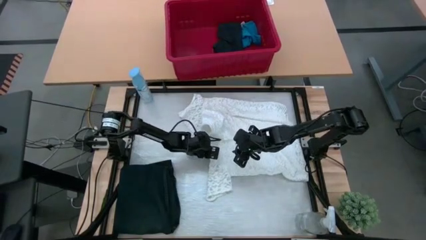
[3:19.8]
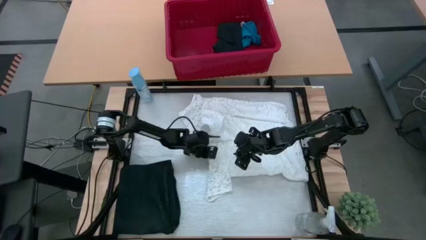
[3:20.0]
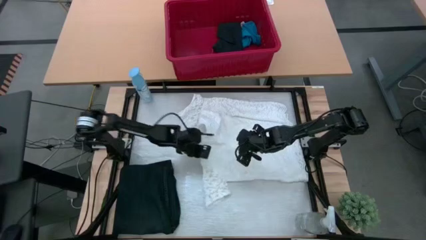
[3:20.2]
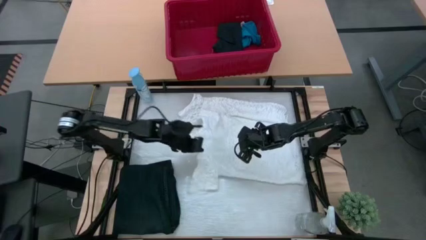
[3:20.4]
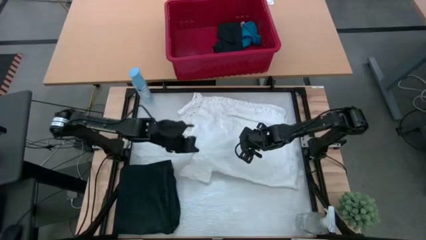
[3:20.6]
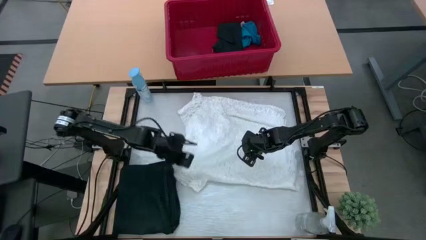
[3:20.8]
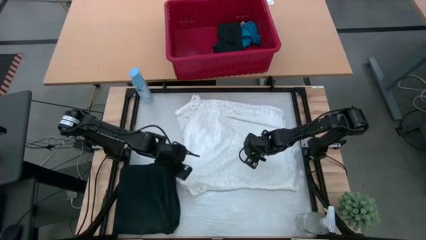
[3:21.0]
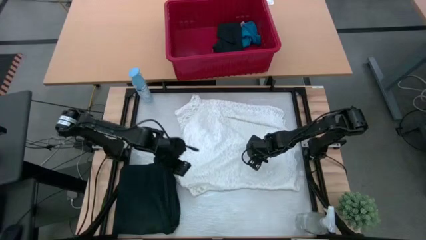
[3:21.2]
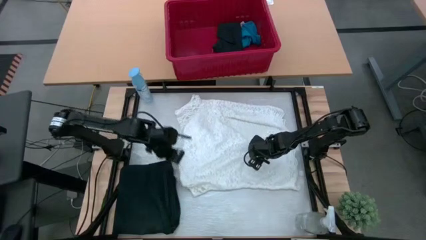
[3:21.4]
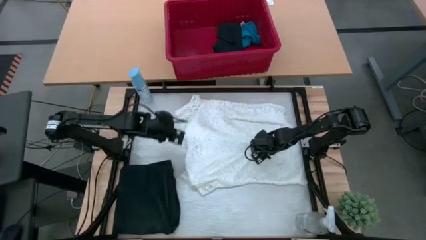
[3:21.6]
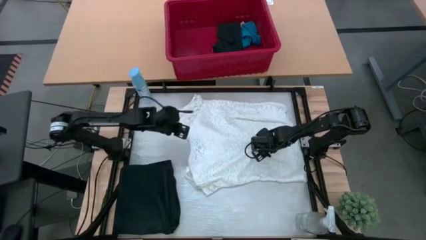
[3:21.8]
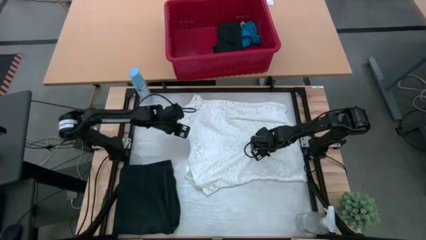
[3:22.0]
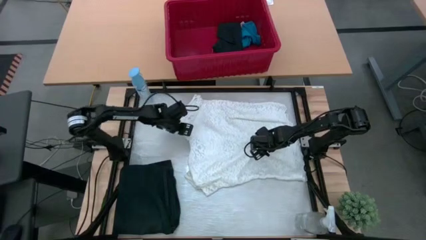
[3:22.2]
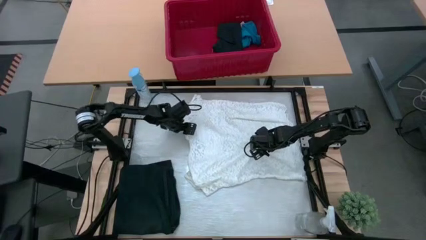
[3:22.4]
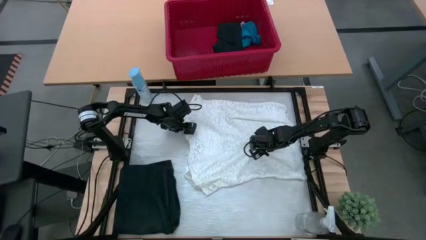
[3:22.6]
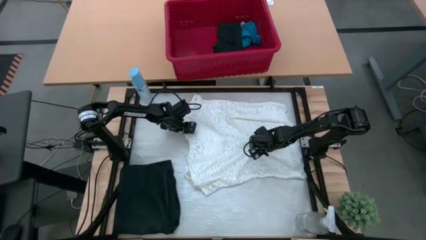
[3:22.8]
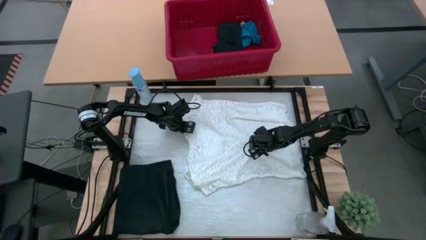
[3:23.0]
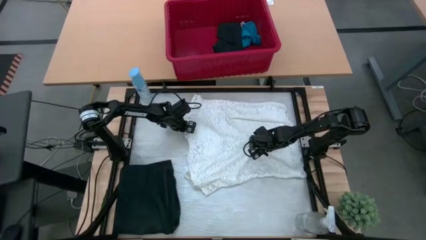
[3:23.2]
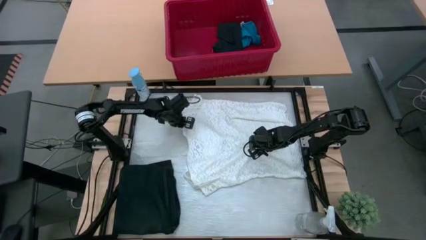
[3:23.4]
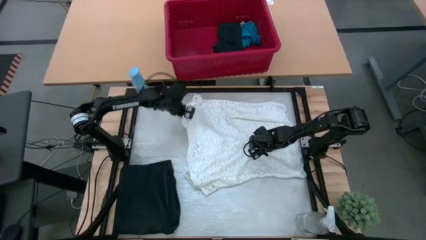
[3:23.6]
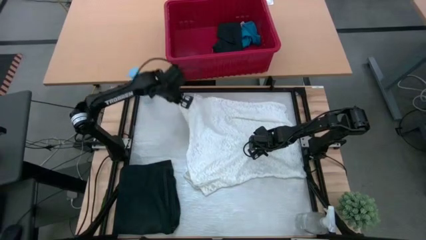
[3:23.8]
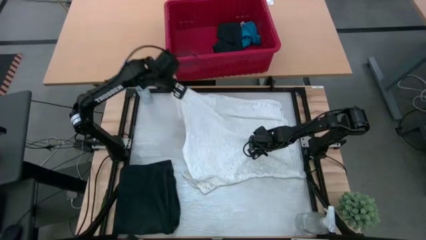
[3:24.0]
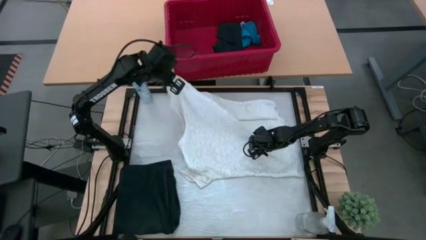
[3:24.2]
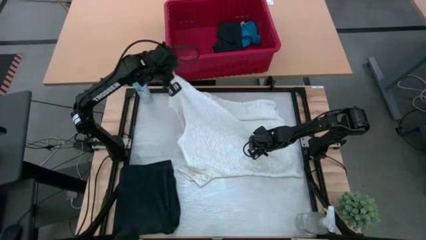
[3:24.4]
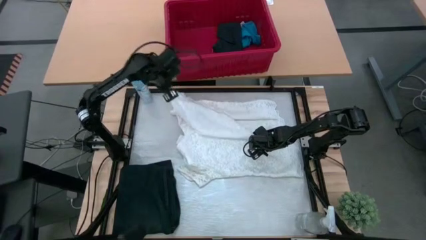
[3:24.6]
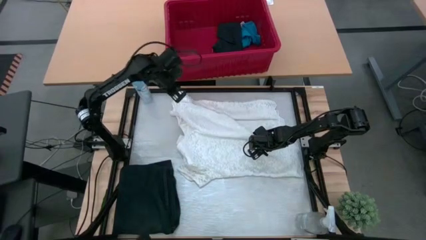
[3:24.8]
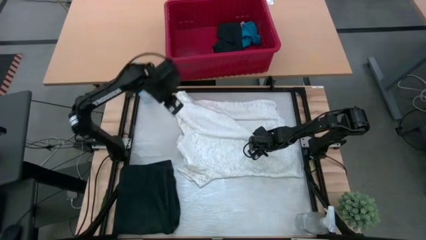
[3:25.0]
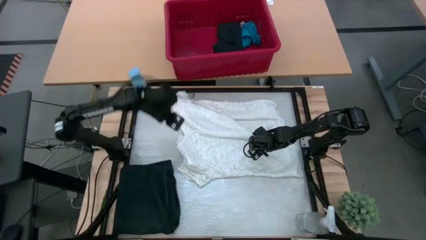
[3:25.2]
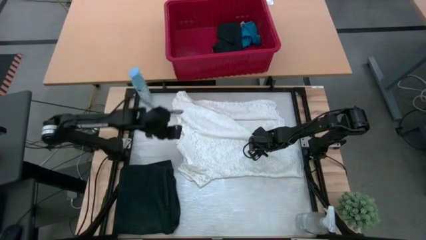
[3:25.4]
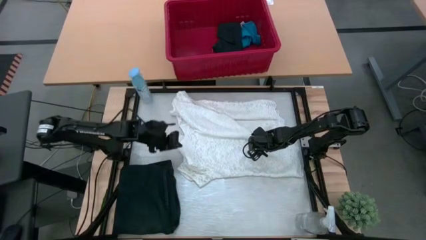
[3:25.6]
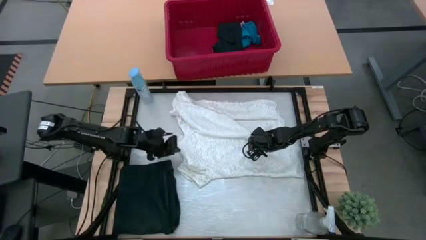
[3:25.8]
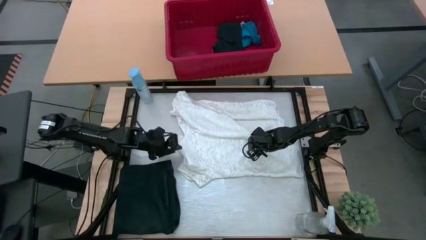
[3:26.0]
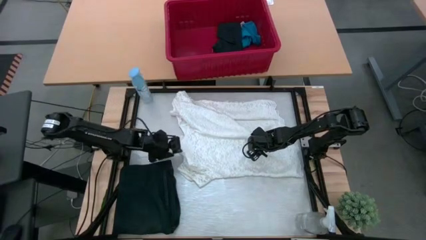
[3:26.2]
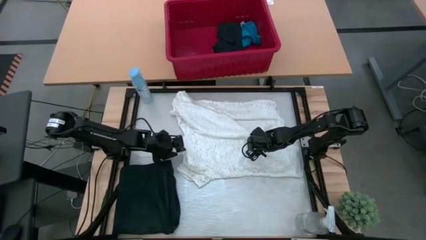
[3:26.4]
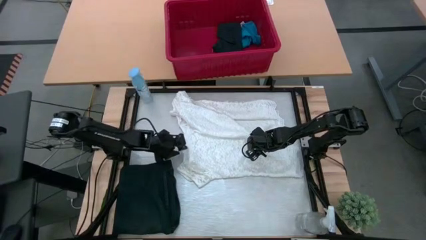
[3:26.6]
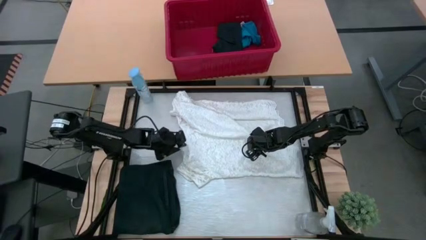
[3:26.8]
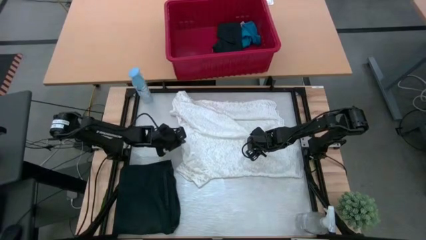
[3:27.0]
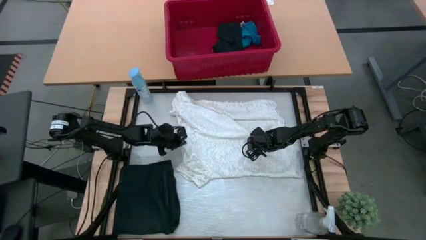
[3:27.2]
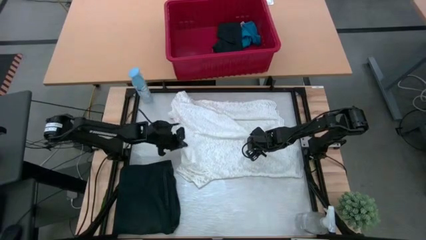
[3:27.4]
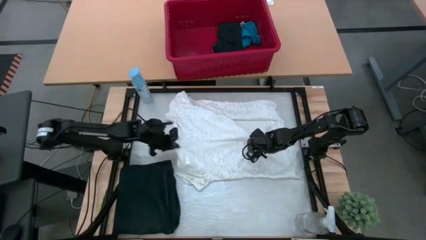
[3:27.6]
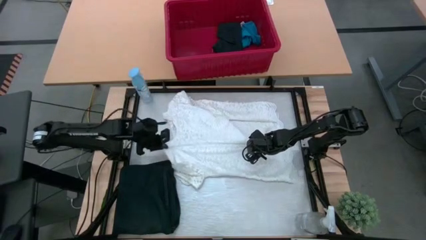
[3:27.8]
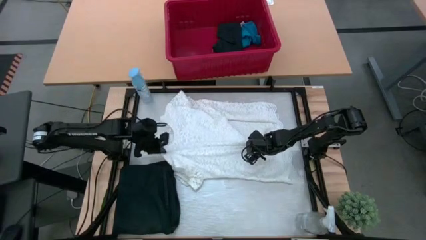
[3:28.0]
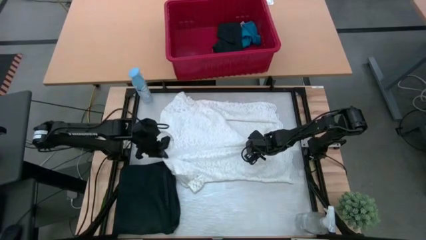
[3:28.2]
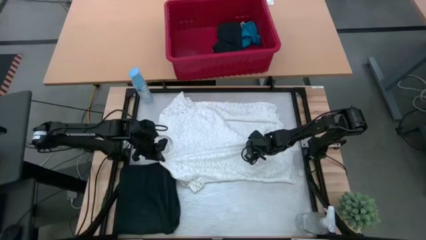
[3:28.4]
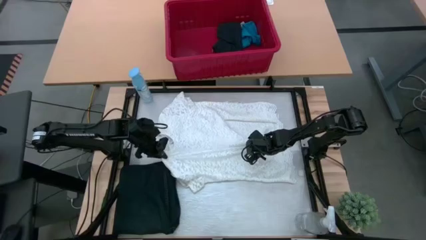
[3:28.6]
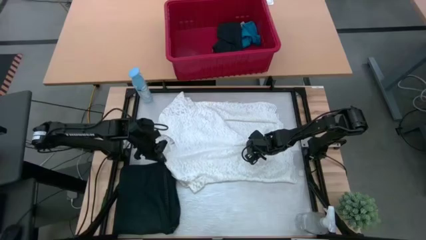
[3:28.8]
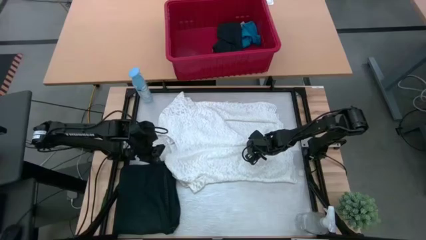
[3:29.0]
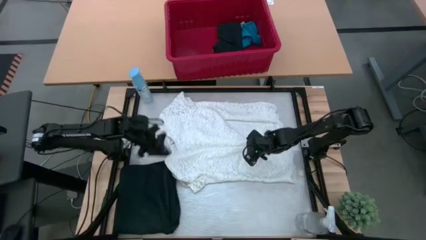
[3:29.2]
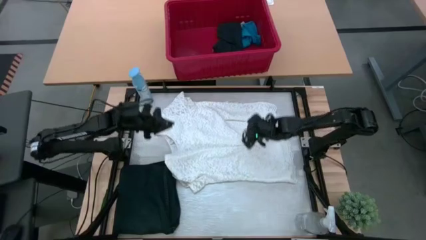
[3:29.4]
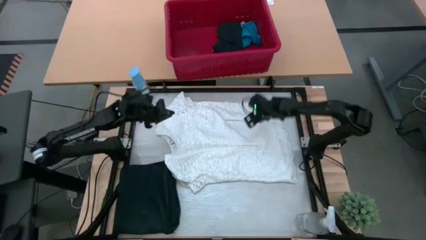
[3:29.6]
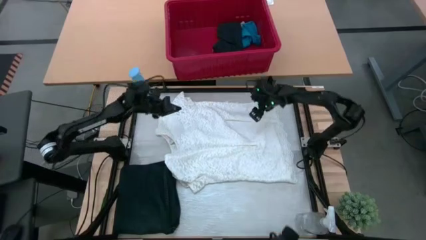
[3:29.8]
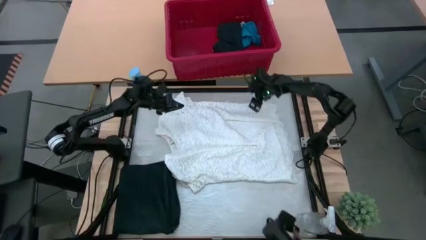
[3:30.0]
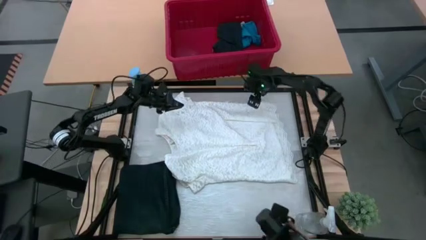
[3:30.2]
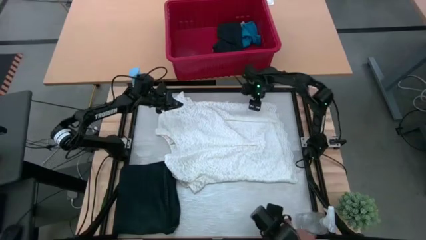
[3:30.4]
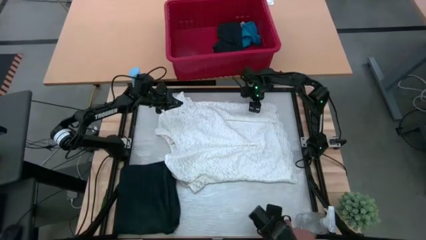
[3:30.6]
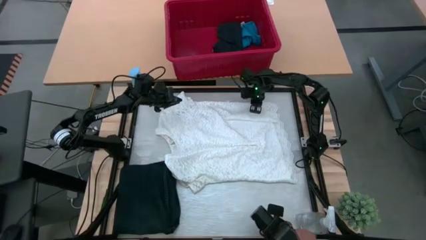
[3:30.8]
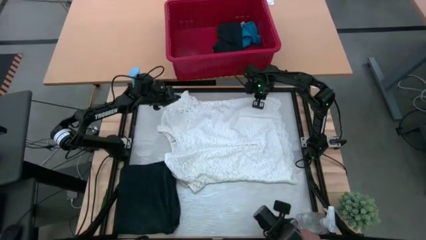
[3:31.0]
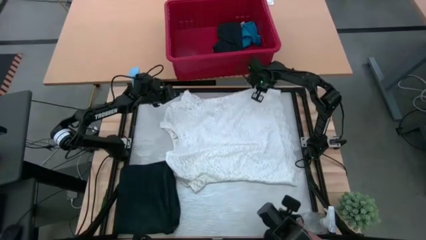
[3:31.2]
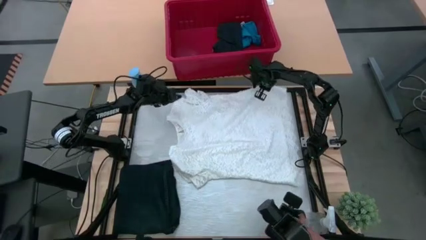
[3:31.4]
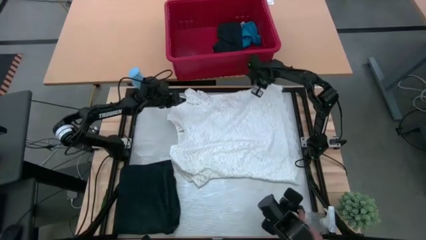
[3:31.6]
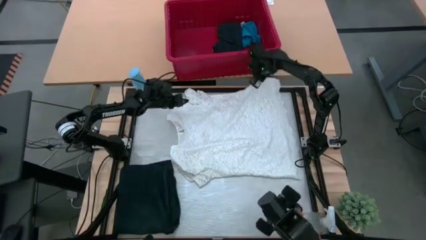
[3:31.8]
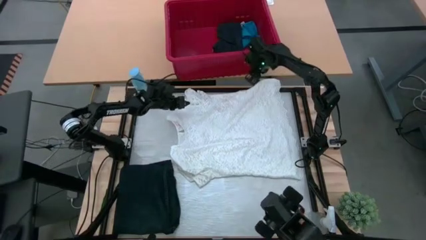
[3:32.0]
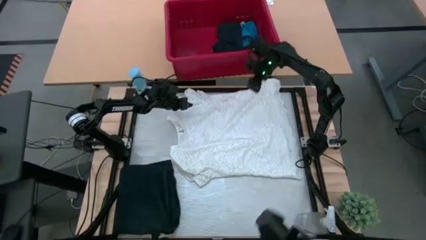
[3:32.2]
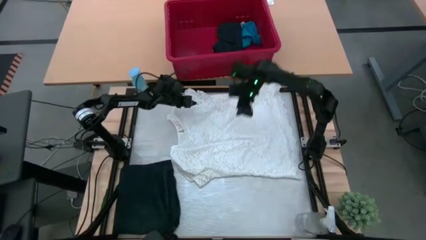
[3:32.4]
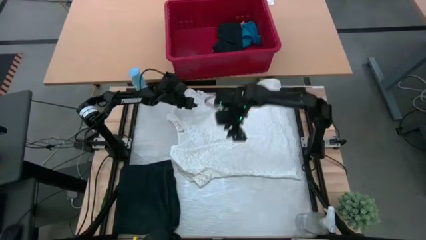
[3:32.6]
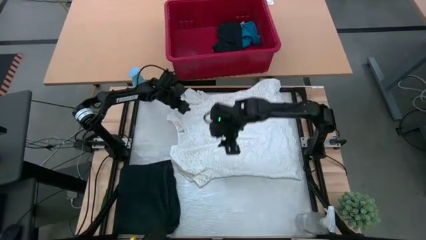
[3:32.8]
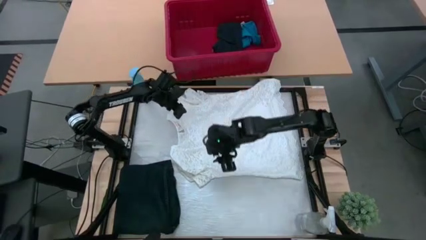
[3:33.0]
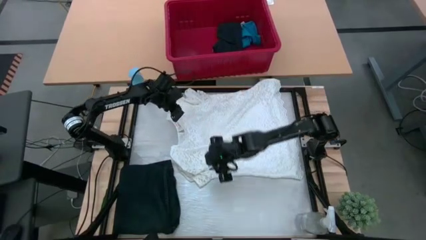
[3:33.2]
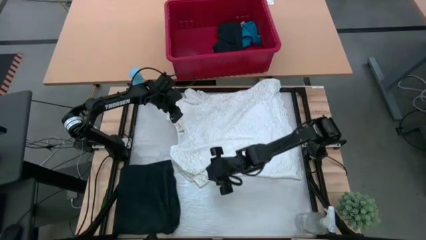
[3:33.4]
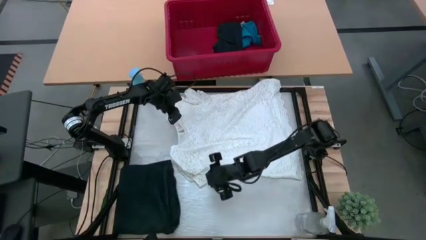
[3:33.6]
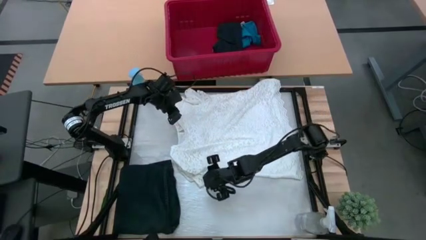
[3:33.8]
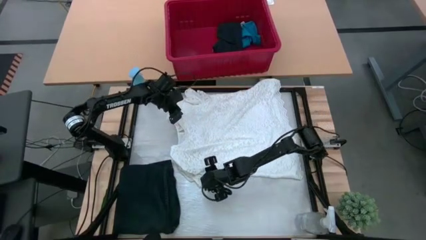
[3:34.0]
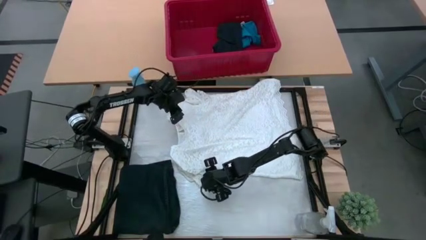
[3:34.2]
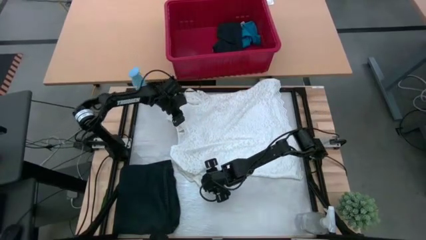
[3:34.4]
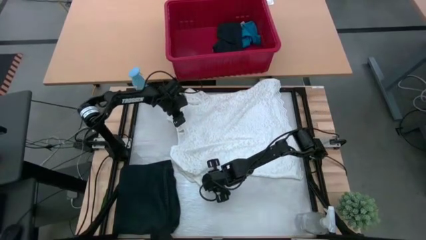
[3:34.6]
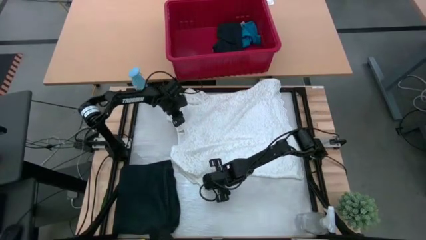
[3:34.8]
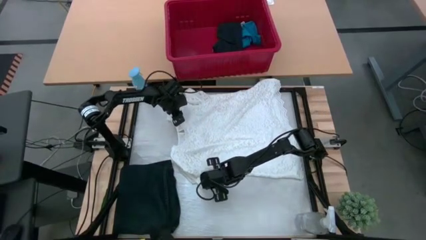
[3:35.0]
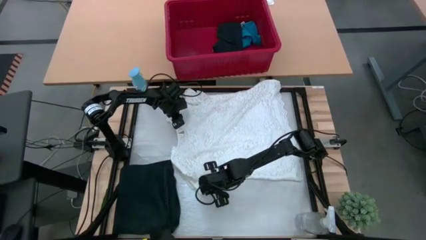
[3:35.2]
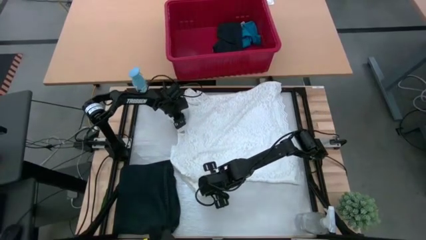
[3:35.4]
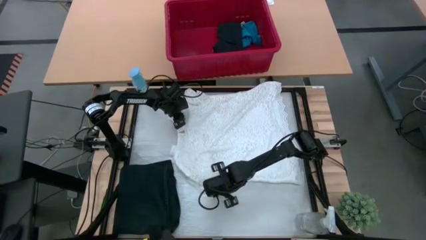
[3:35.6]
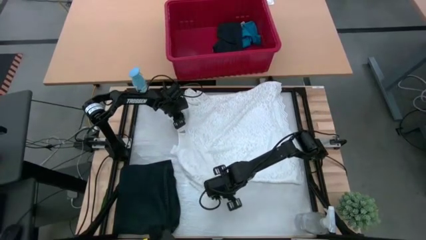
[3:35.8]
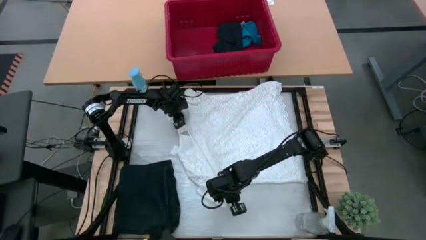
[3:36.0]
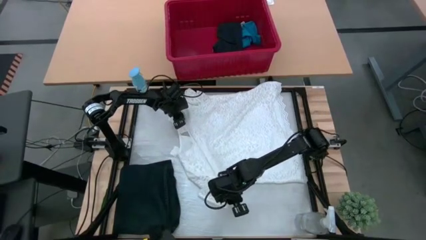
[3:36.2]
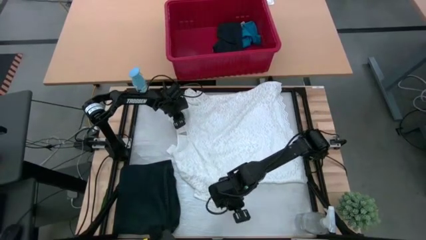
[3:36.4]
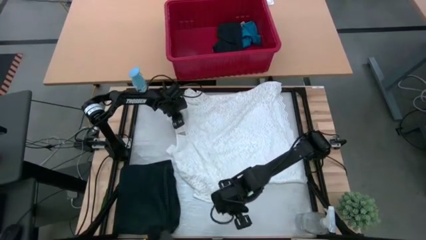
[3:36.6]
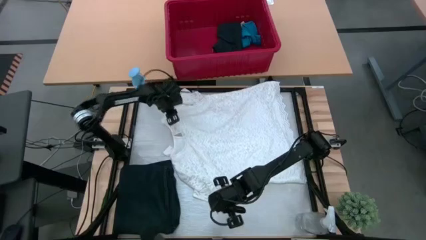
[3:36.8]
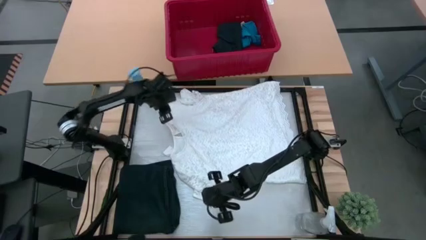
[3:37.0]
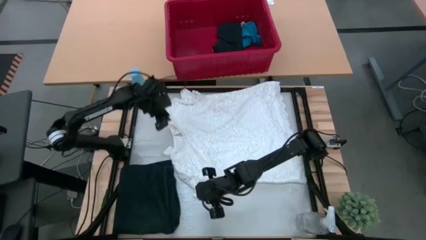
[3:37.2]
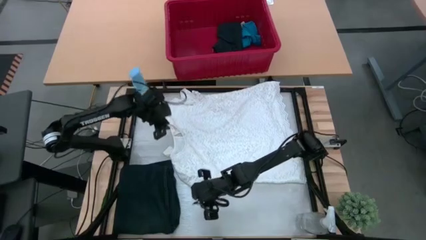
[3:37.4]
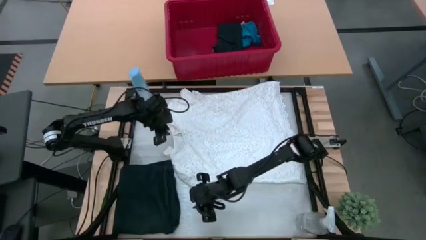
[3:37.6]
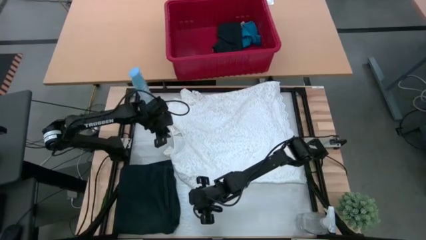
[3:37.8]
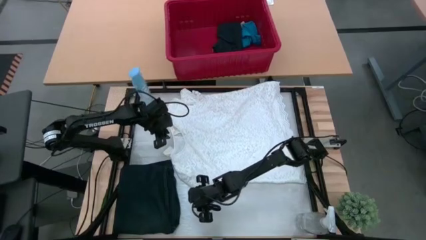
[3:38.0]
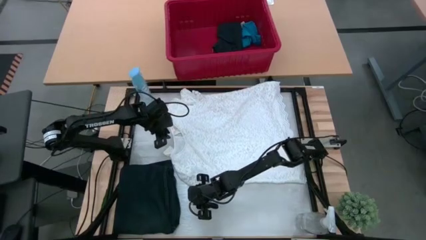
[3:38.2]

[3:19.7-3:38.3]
Task: Fold Laundry from Bin
Fold the white dress from the red bin
